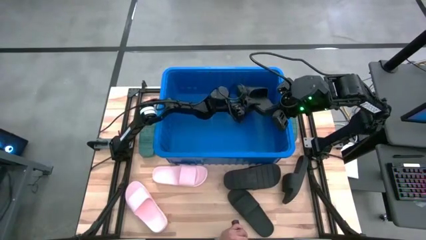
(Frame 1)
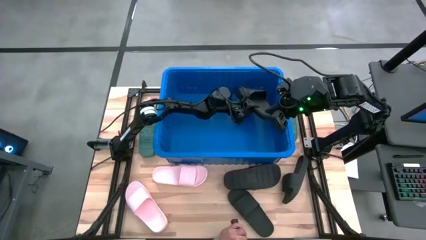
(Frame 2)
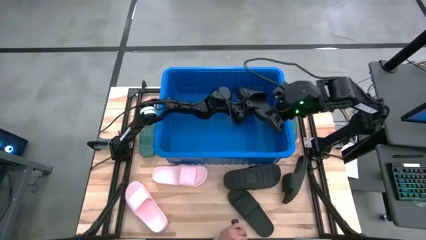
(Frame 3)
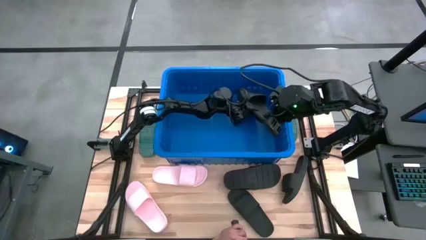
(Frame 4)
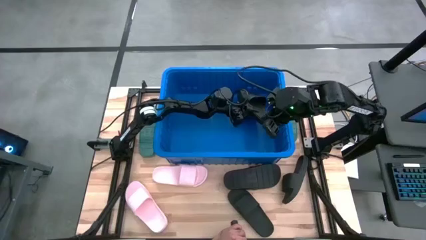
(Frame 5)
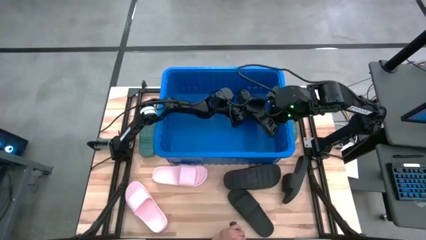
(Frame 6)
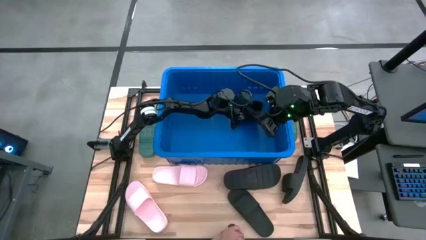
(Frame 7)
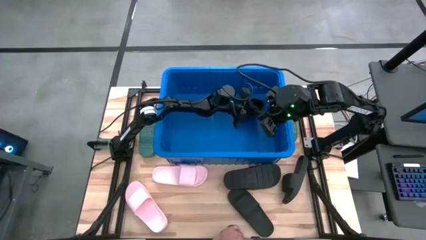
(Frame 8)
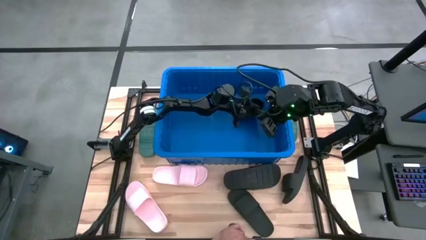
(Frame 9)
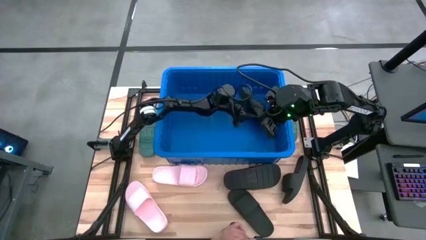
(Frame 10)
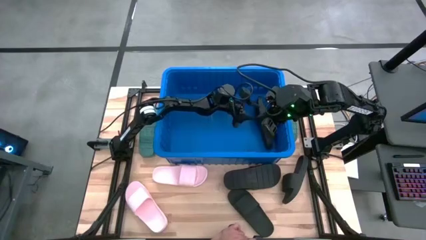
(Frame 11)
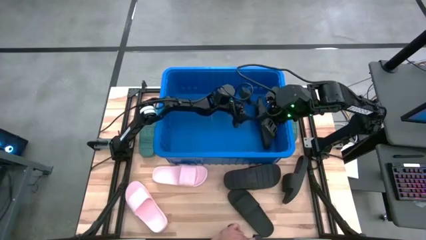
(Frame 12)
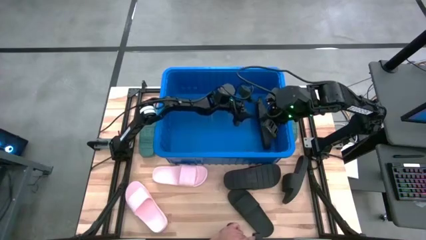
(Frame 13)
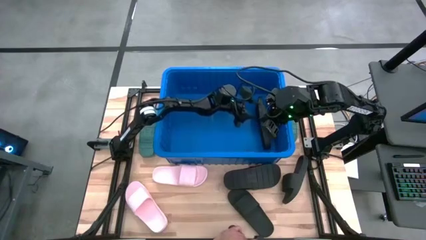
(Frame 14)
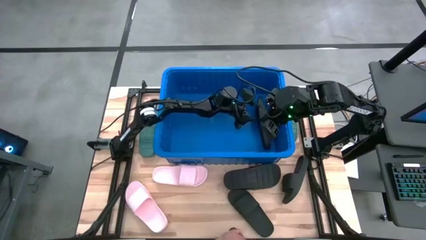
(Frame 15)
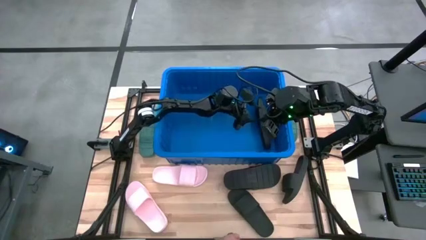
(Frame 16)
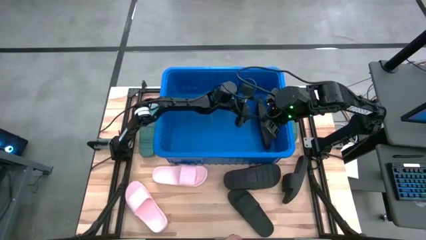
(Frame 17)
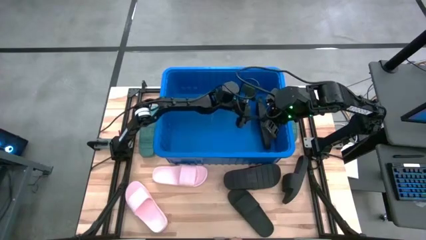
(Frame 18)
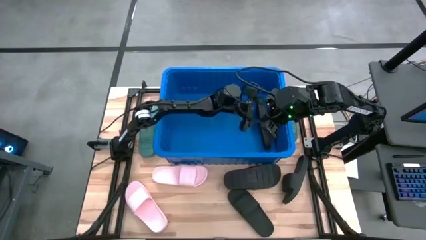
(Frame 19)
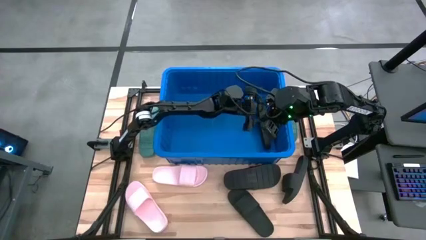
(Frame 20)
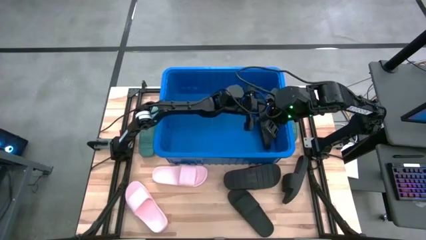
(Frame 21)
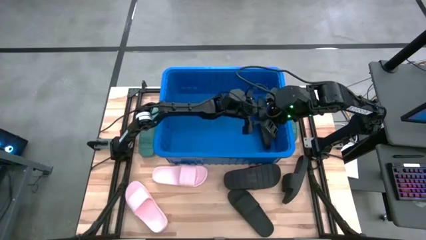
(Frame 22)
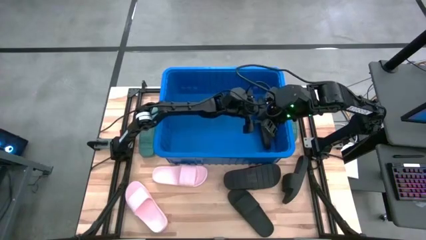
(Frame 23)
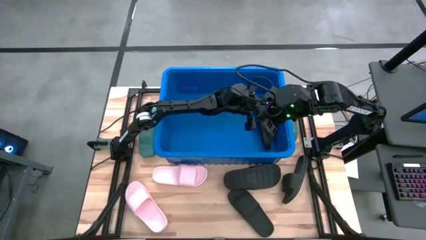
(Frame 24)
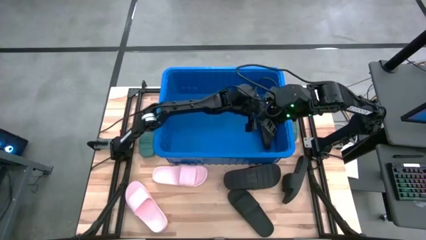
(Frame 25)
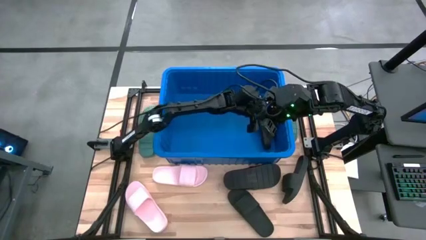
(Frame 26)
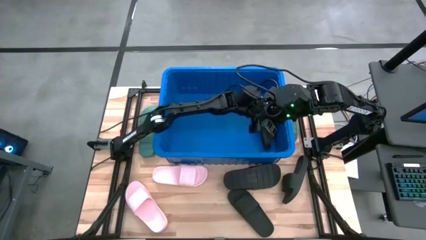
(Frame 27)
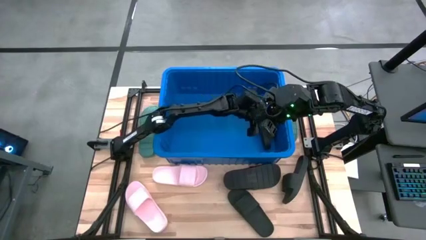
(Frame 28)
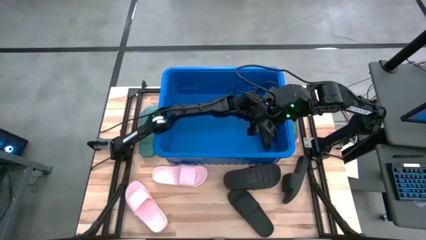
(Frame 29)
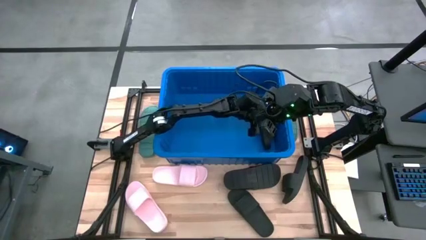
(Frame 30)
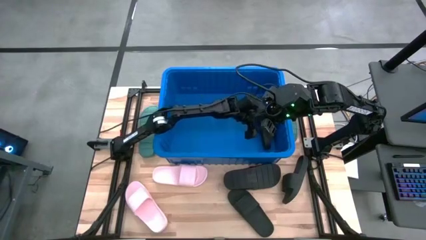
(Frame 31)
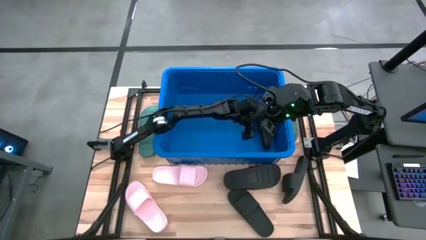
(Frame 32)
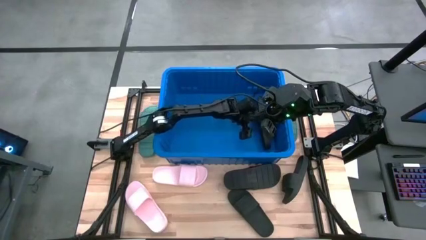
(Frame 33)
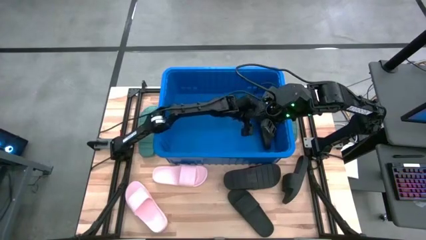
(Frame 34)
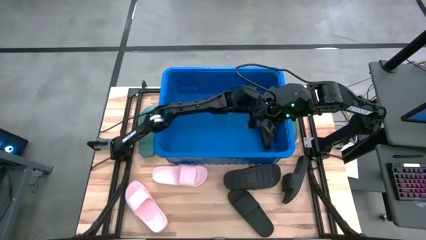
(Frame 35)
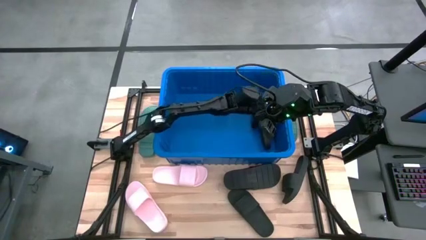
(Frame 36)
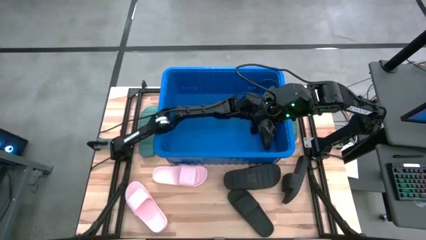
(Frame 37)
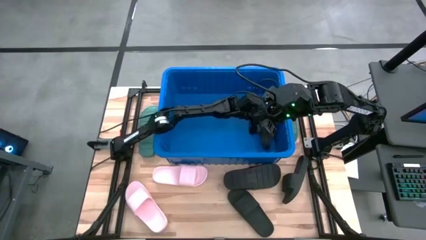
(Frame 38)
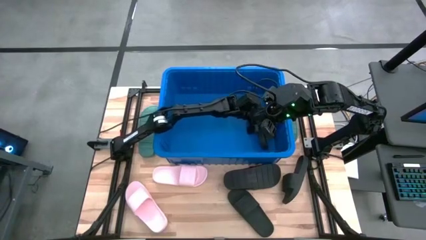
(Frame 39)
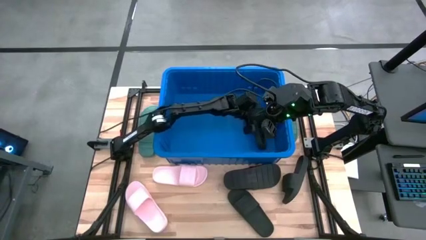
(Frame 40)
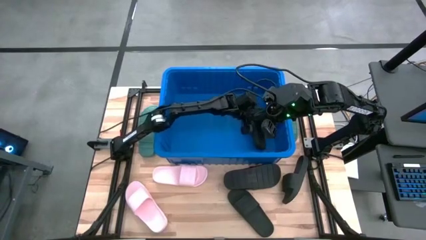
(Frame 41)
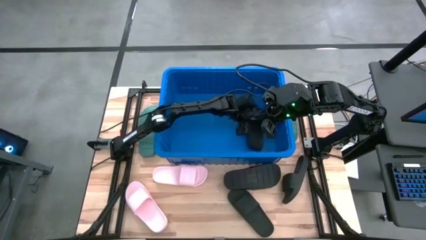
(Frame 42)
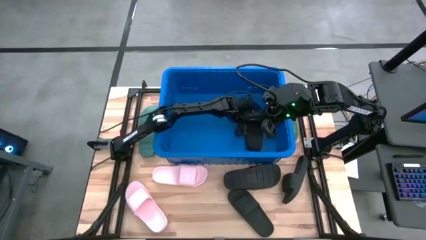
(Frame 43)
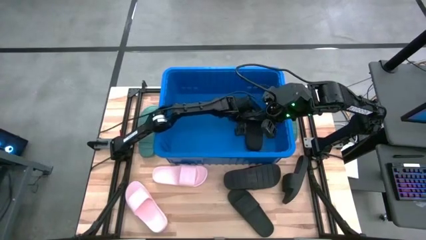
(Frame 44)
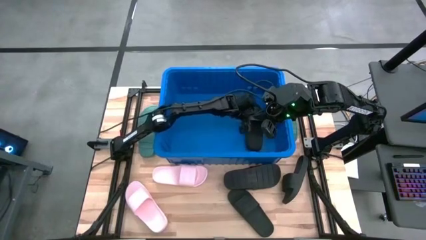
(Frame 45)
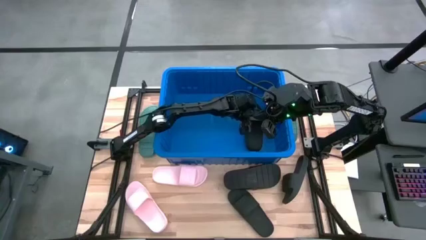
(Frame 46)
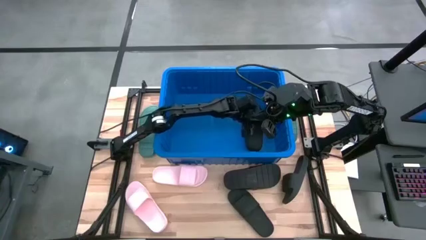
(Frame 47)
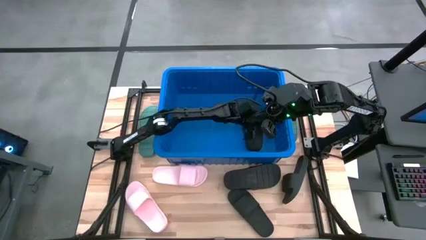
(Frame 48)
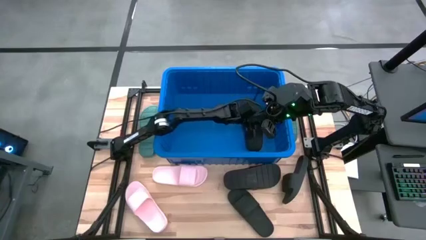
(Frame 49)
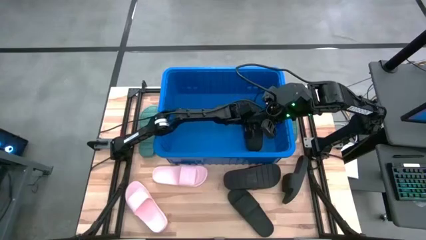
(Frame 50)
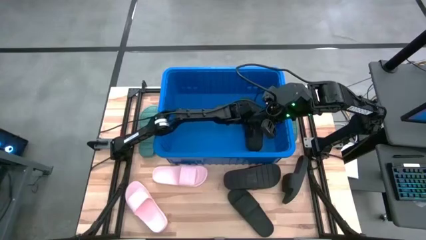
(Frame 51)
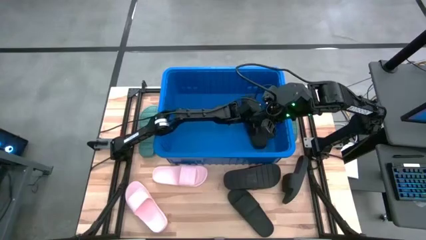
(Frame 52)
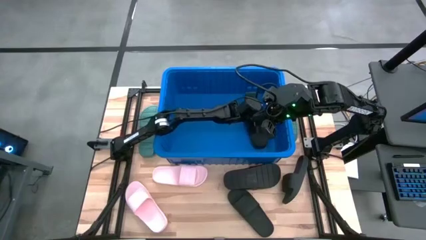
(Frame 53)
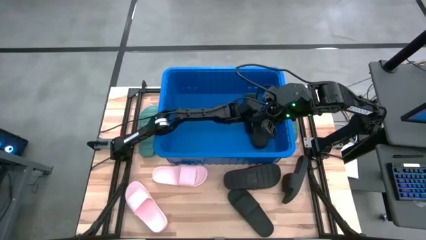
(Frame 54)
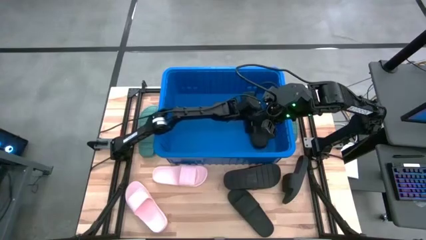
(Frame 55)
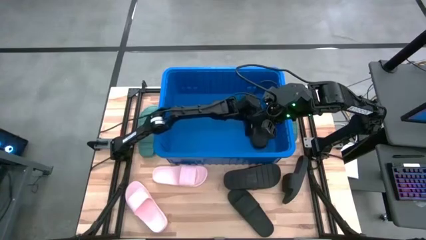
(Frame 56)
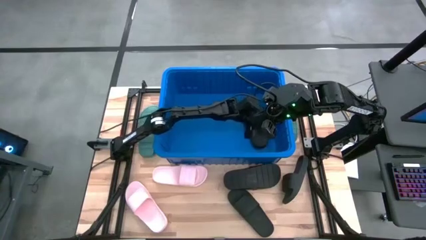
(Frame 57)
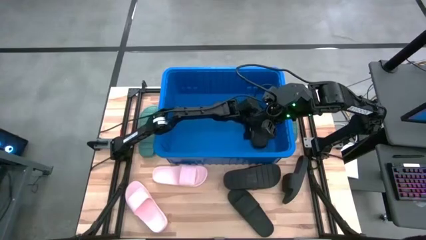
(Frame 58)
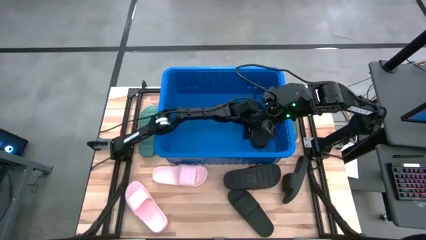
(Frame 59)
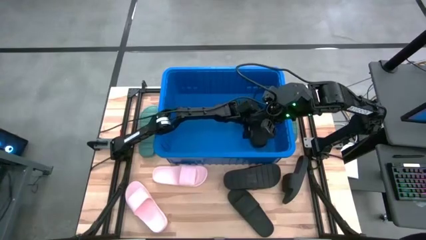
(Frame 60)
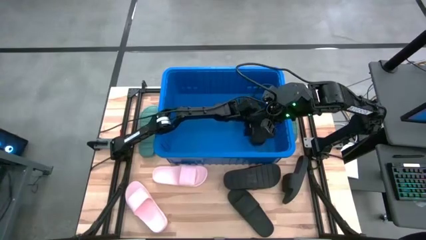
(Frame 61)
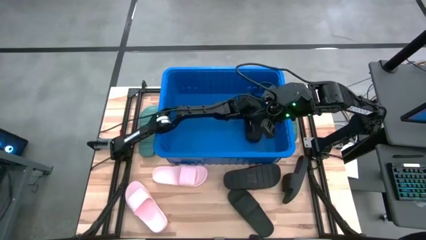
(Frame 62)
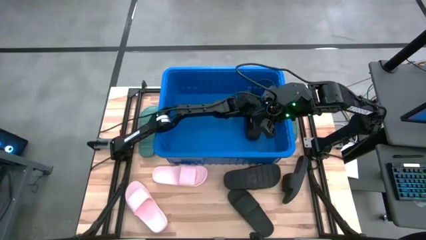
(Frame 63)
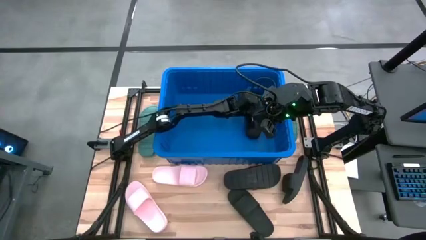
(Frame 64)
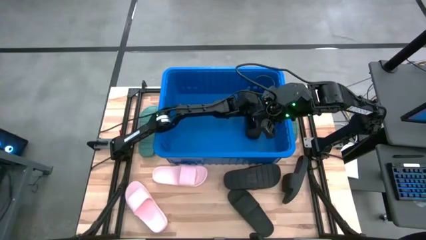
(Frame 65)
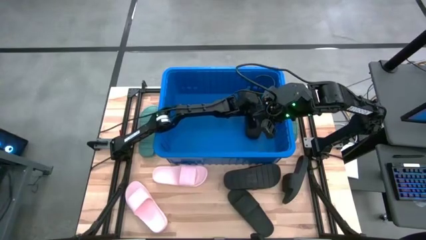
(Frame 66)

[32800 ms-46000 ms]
Task: Pick and place slides into bin
Put the black slipper into the blue bin
